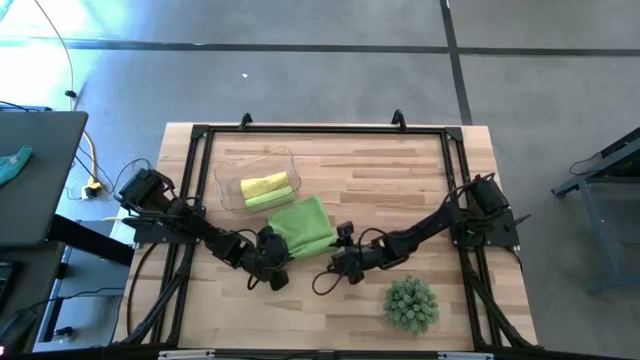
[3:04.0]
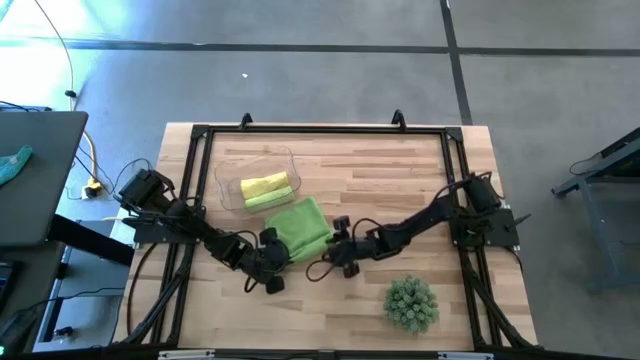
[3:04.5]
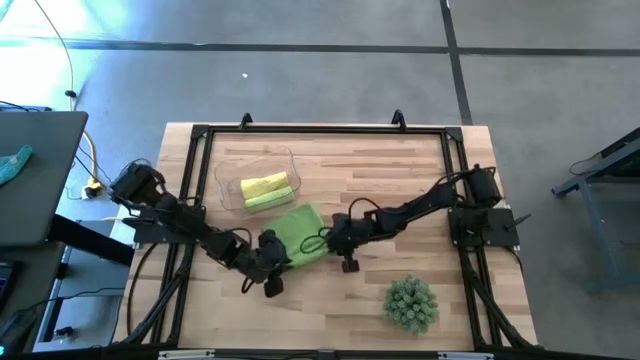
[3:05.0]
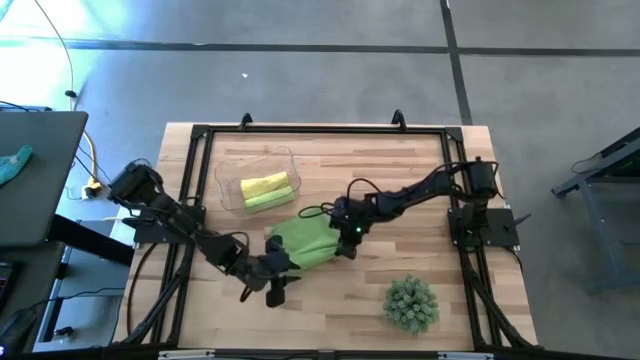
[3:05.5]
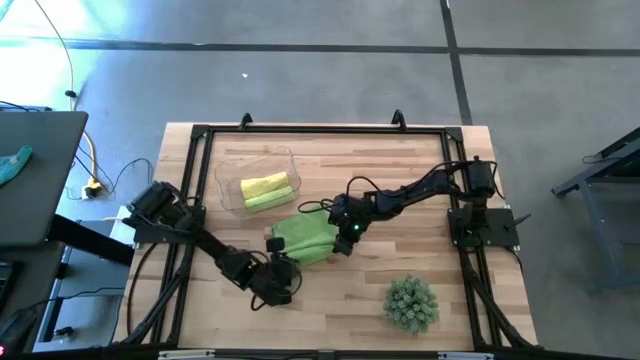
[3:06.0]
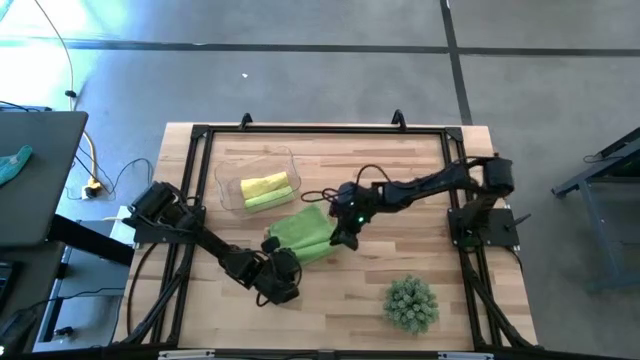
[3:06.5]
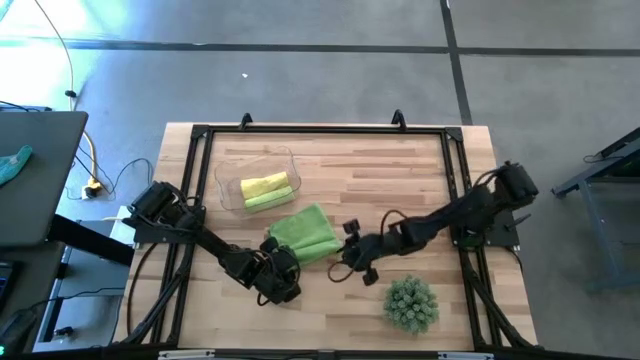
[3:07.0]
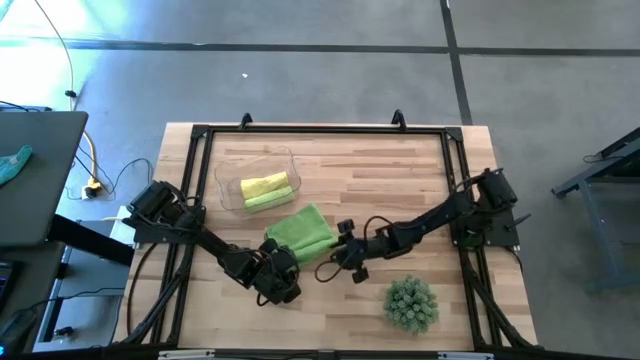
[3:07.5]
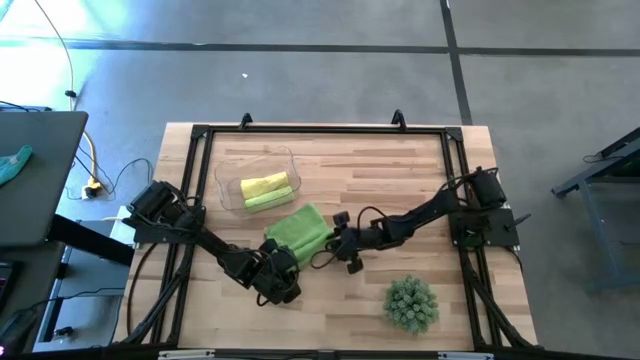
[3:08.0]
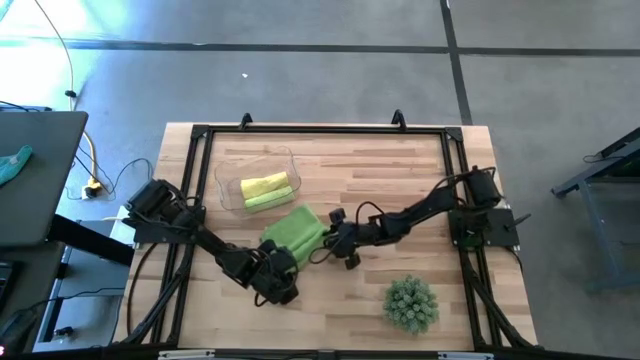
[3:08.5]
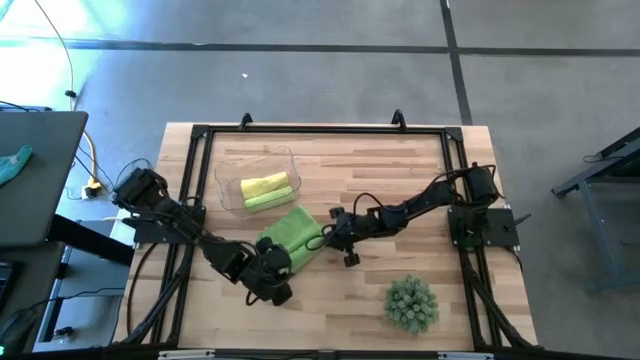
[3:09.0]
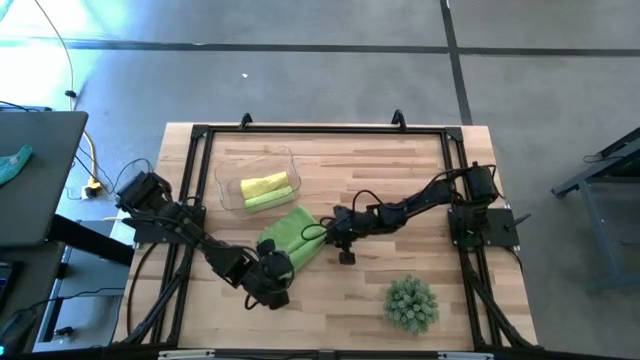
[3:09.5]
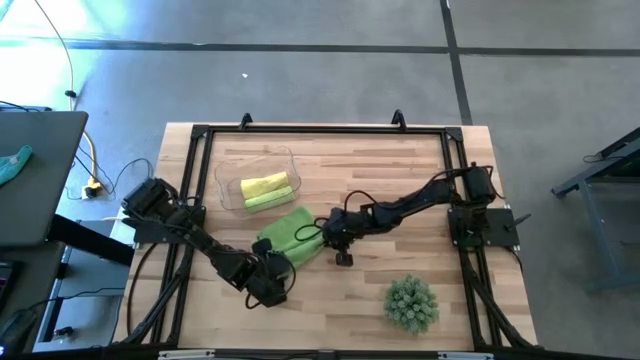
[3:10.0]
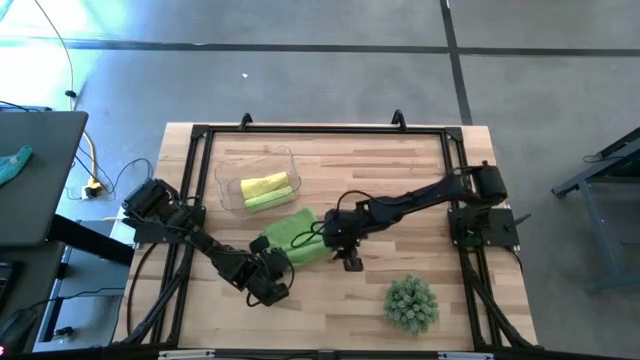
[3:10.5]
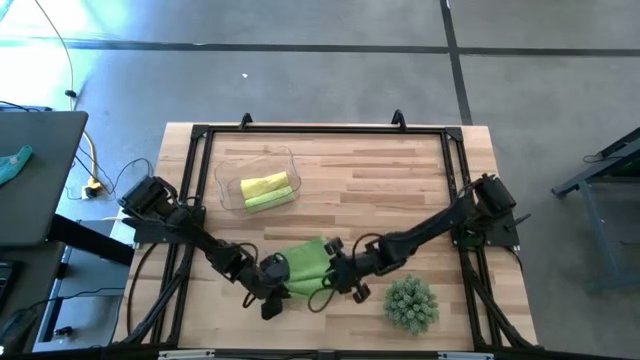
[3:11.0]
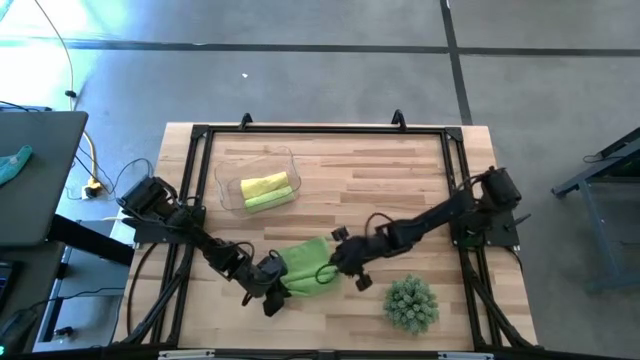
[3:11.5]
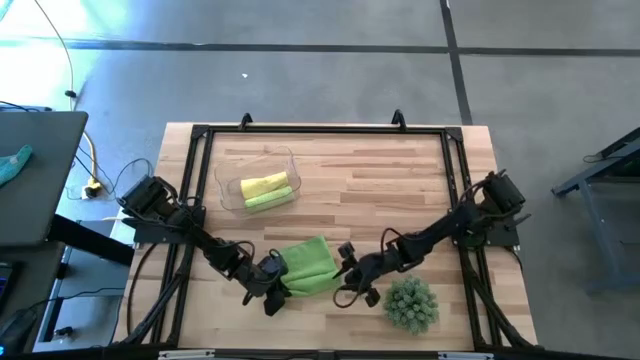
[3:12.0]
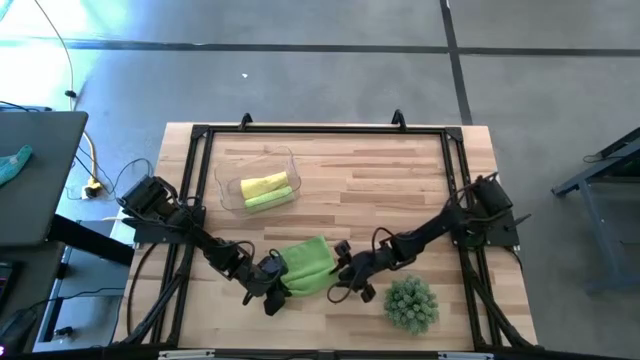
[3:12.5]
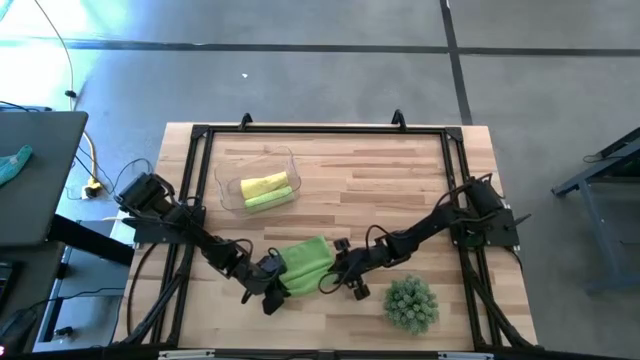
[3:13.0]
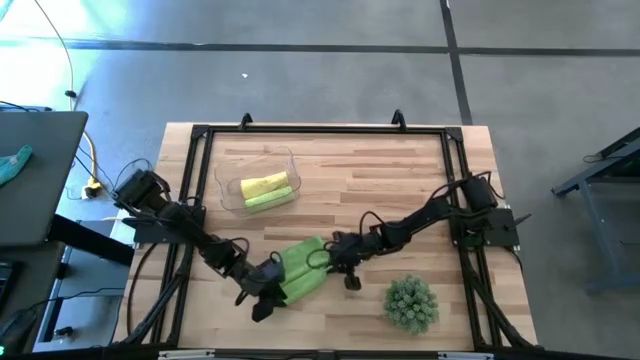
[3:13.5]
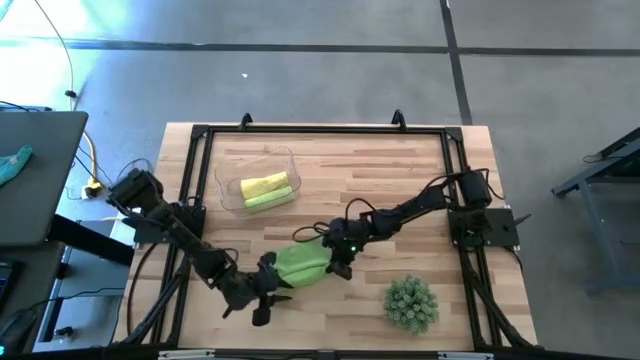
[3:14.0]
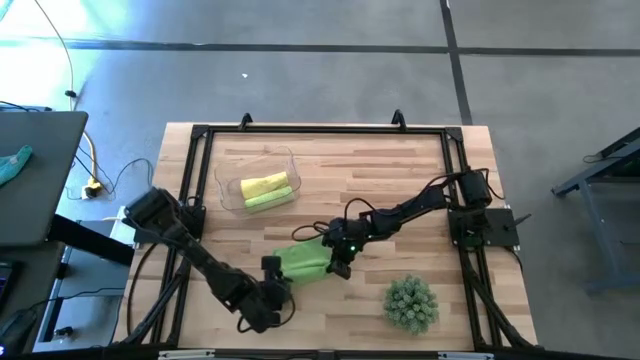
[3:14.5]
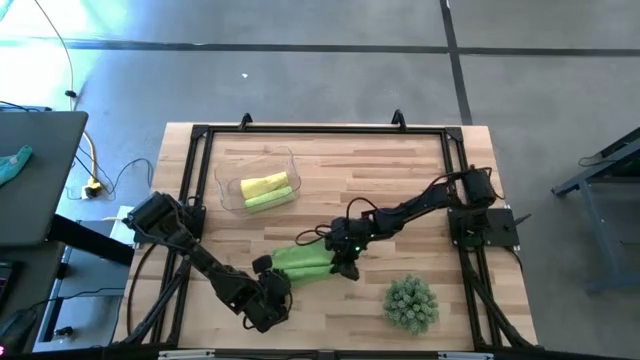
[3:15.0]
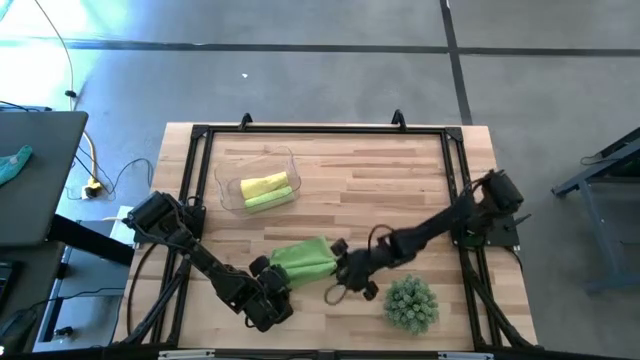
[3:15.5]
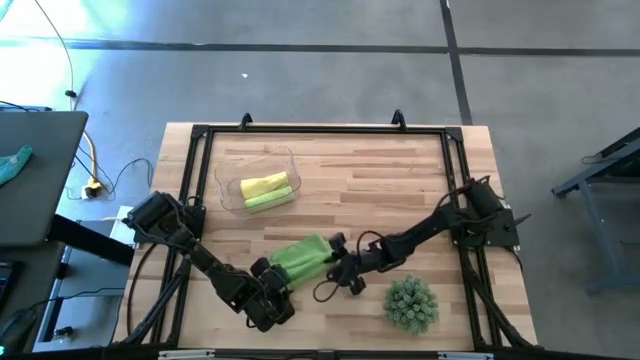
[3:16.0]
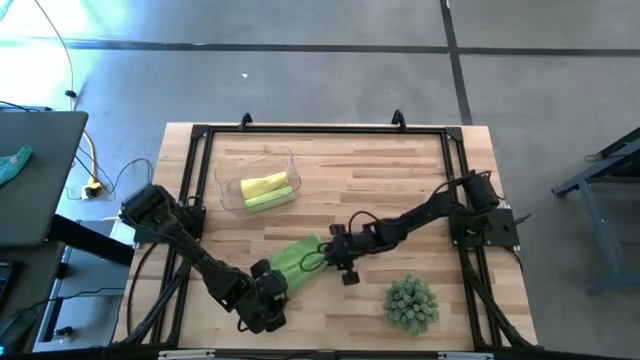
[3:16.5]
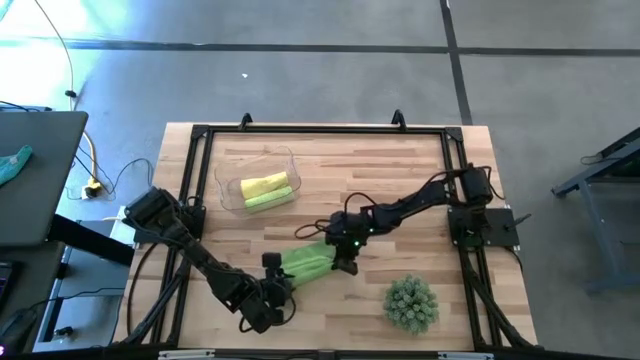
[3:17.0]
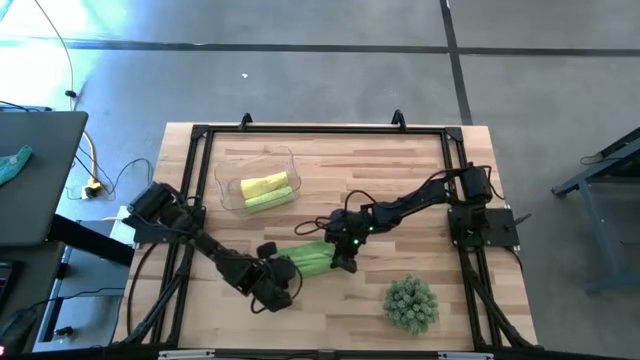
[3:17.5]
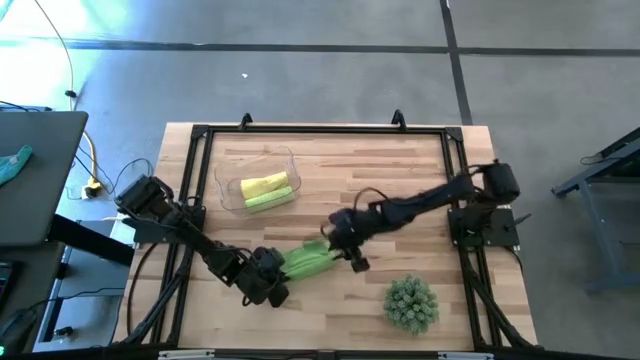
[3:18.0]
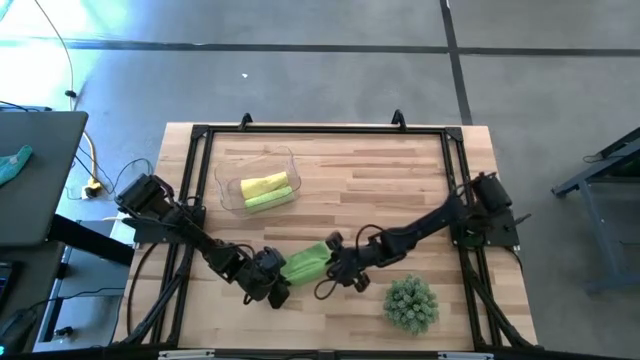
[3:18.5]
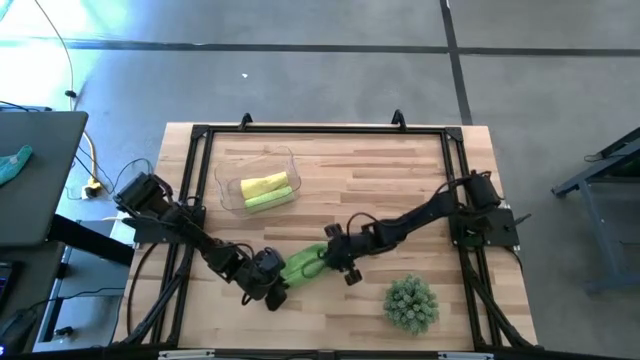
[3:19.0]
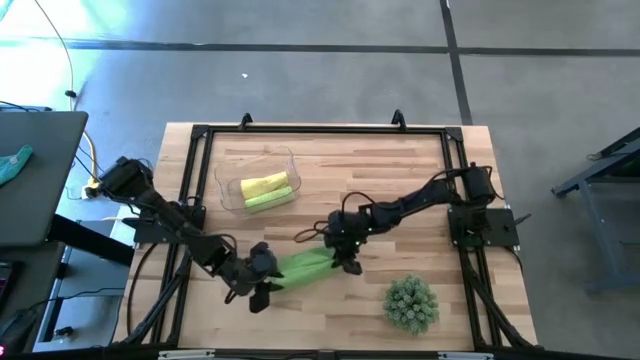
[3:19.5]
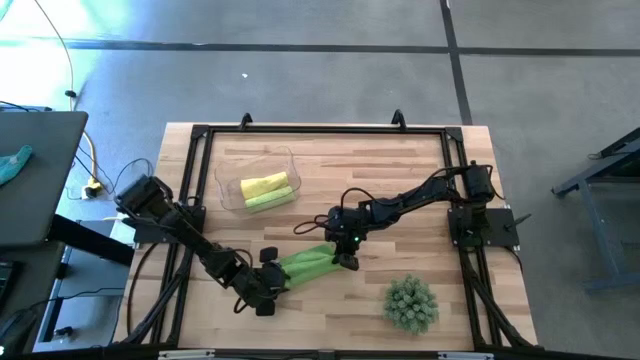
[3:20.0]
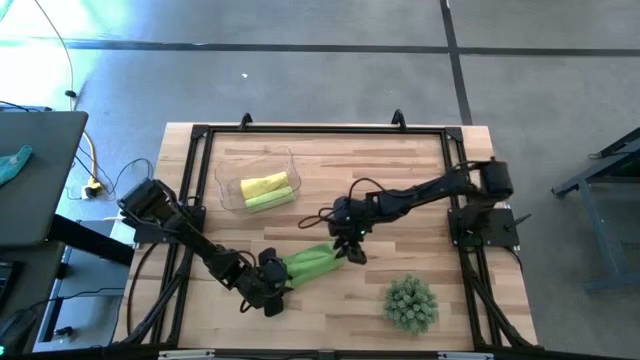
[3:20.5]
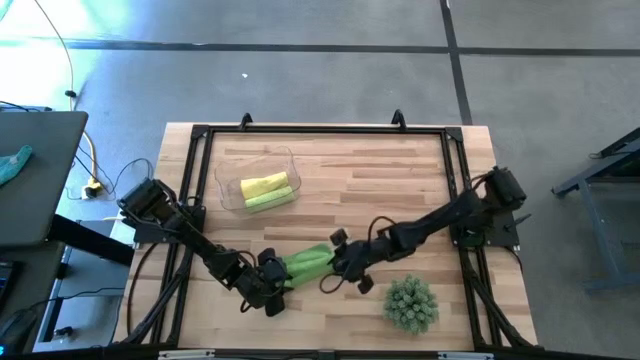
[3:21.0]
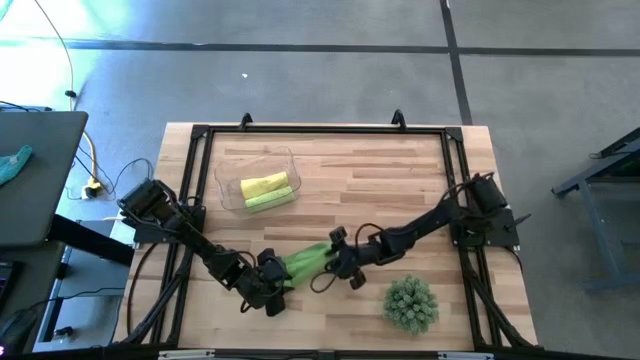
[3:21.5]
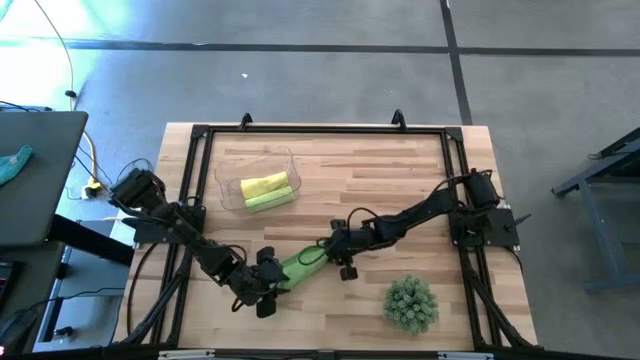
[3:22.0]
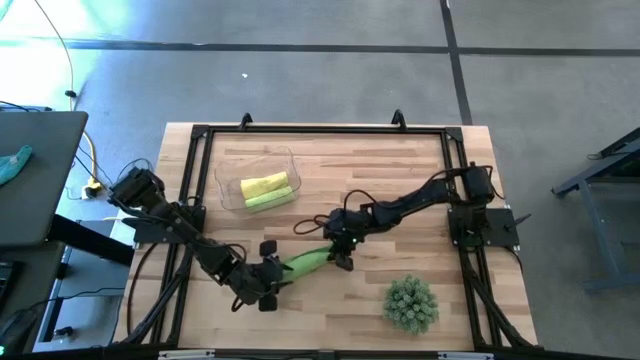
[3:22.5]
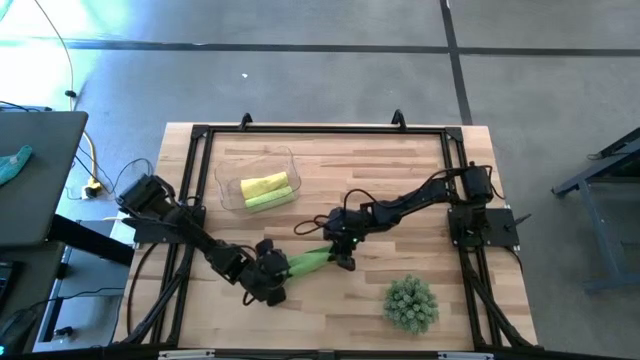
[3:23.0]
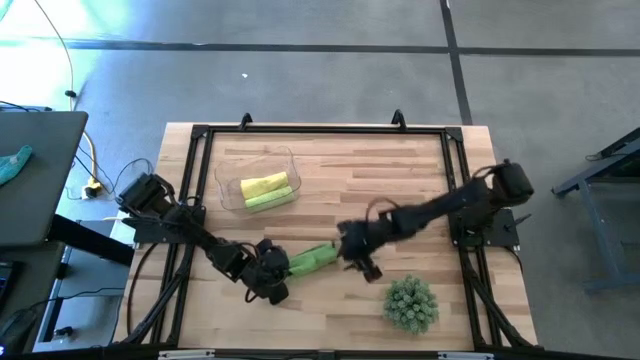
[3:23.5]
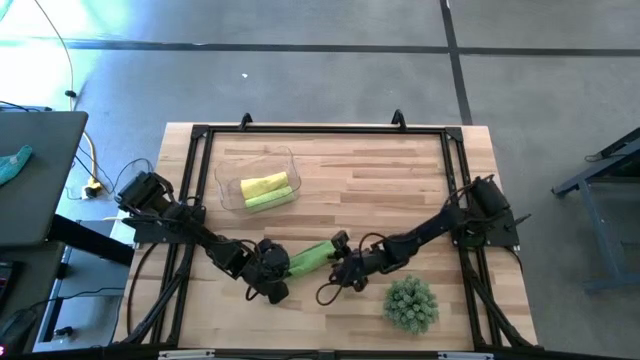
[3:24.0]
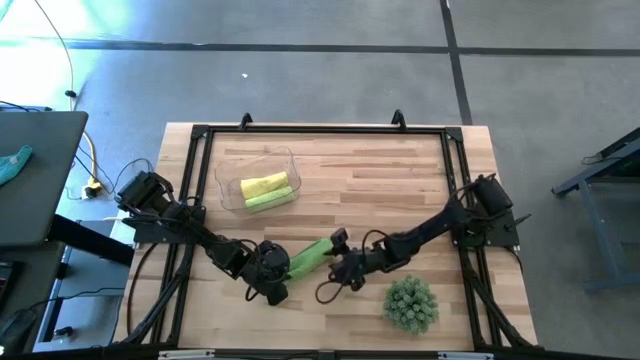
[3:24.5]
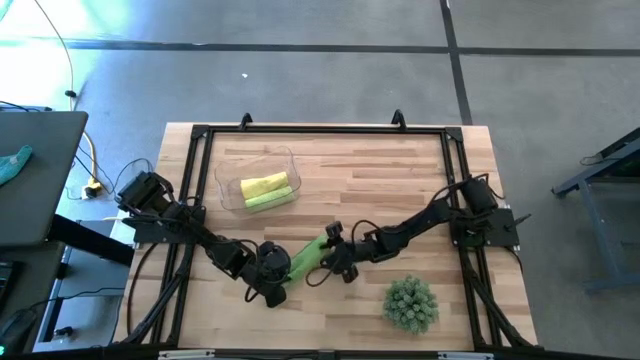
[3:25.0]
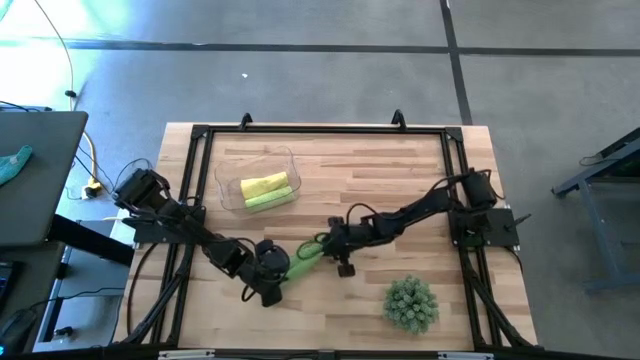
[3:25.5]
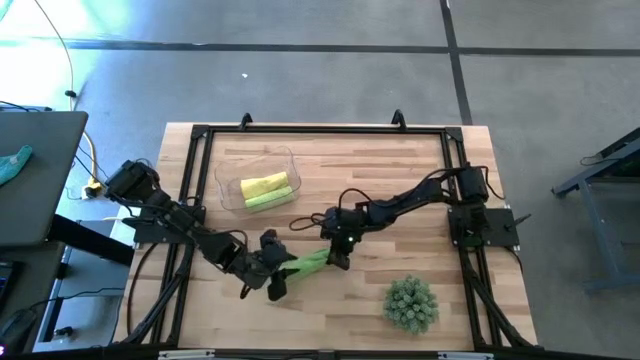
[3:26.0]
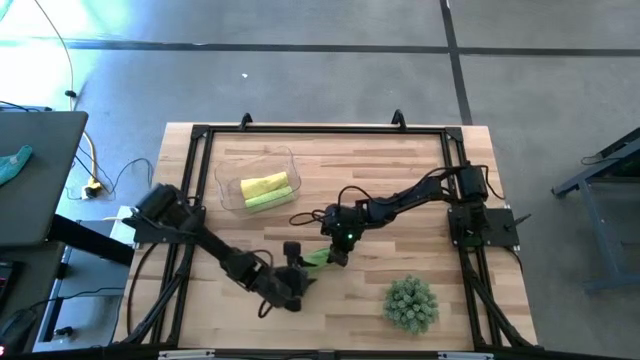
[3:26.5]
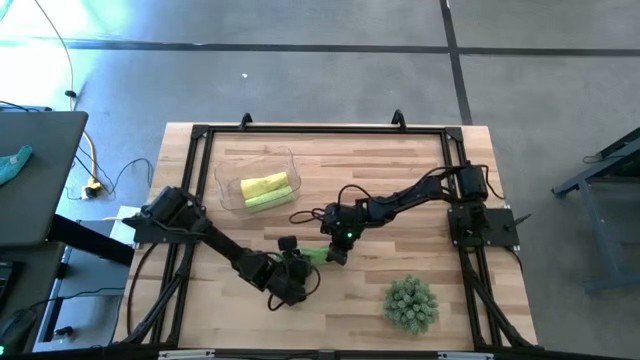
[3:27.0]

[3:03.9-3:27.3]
Task: Roll microfiber towels into tight, uniform cylinder then place into a basket
Roll the green towel
